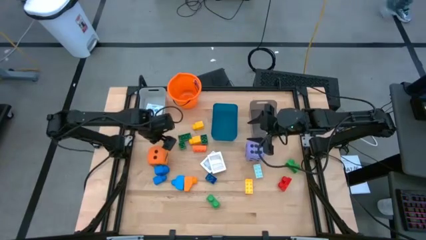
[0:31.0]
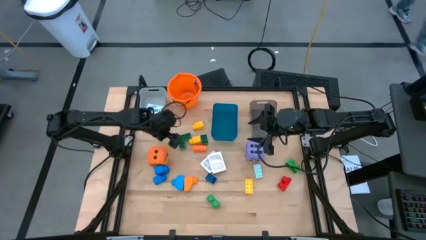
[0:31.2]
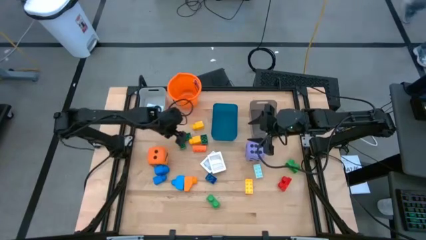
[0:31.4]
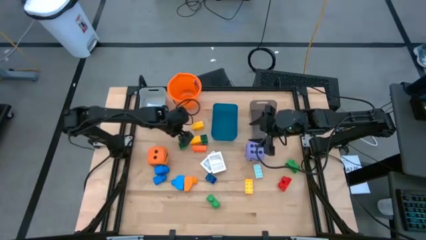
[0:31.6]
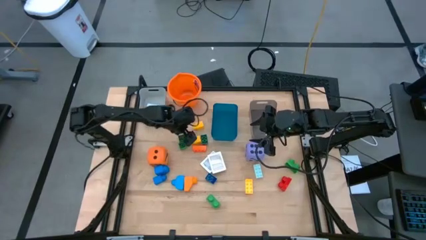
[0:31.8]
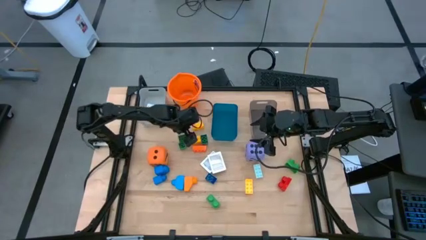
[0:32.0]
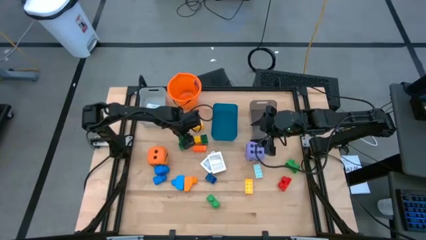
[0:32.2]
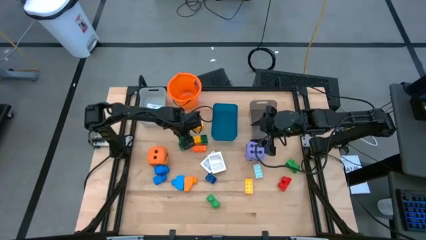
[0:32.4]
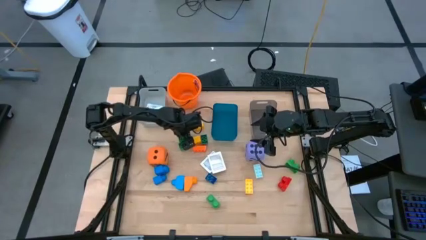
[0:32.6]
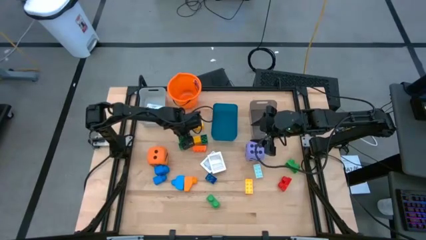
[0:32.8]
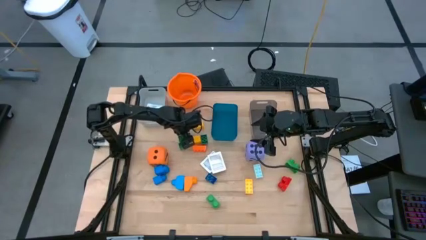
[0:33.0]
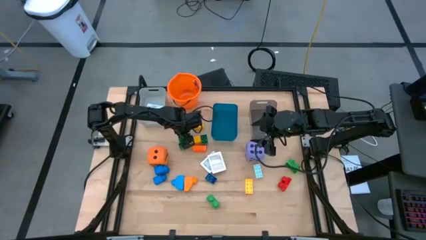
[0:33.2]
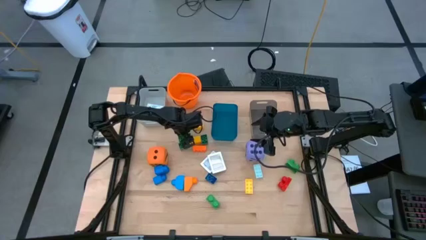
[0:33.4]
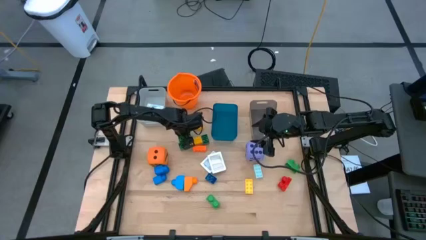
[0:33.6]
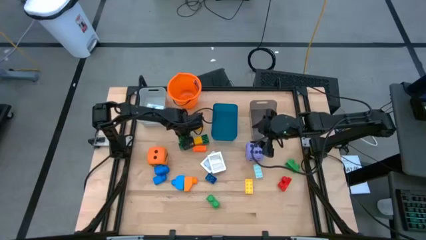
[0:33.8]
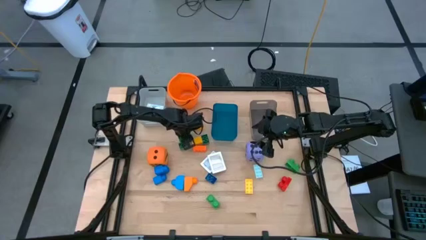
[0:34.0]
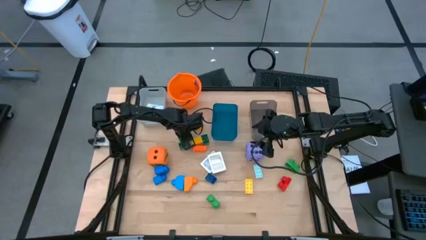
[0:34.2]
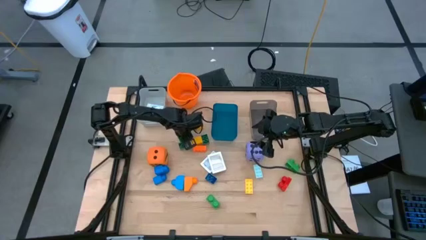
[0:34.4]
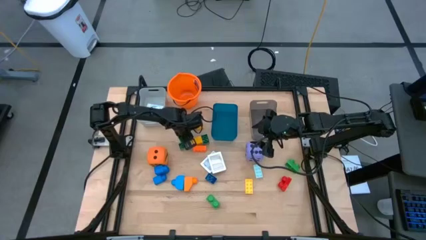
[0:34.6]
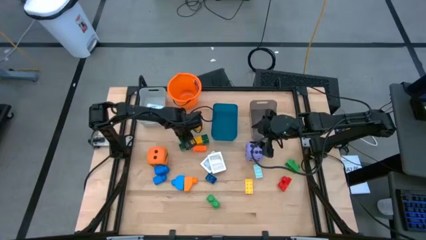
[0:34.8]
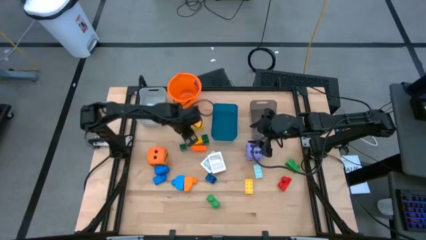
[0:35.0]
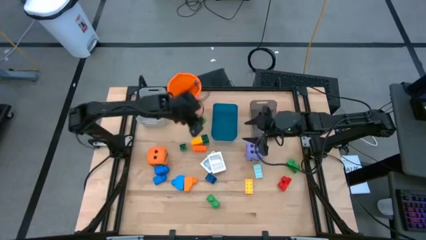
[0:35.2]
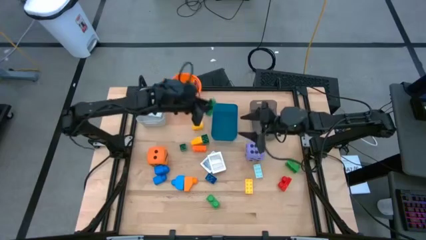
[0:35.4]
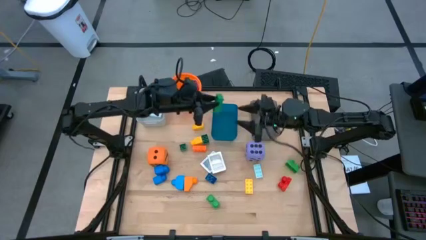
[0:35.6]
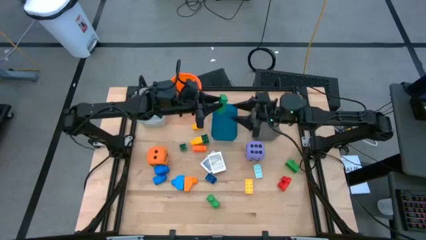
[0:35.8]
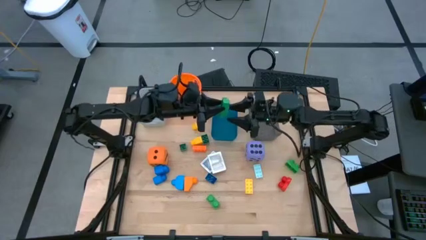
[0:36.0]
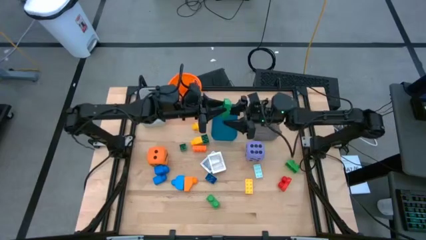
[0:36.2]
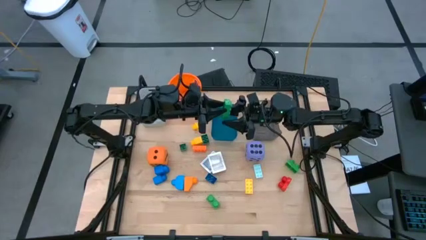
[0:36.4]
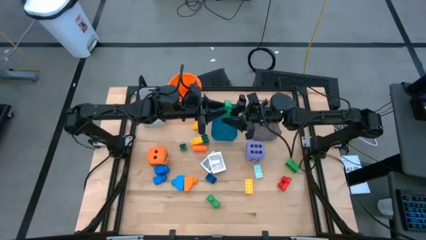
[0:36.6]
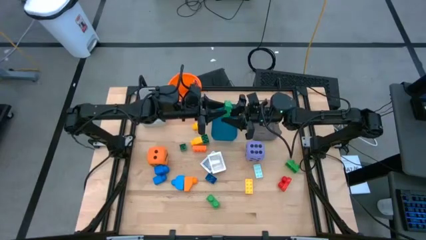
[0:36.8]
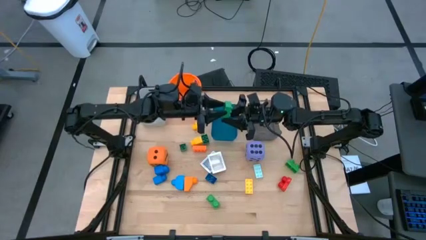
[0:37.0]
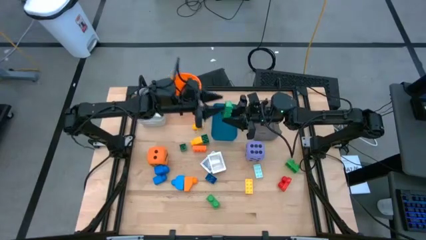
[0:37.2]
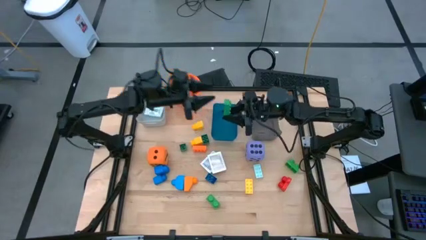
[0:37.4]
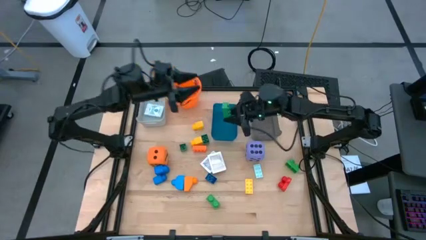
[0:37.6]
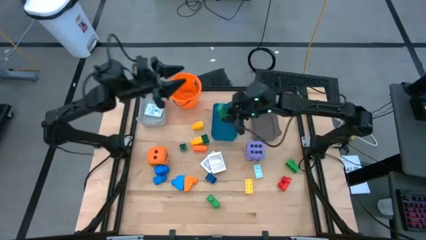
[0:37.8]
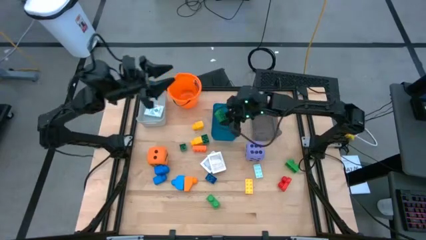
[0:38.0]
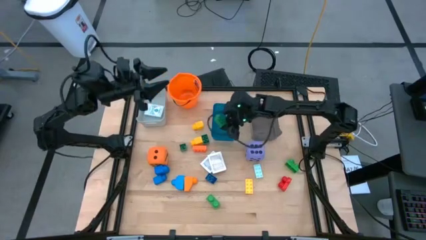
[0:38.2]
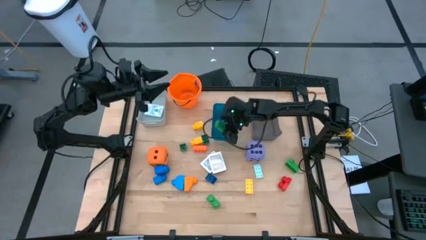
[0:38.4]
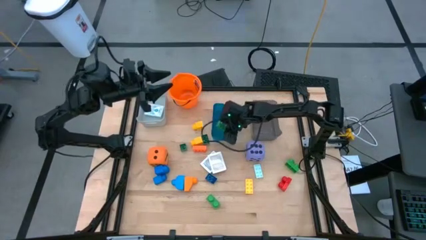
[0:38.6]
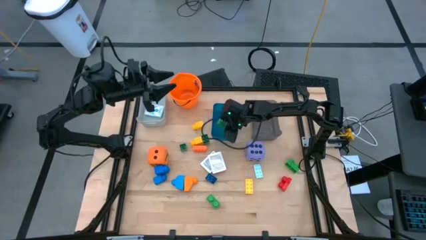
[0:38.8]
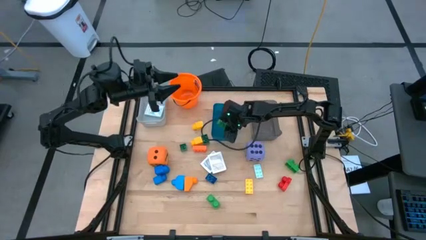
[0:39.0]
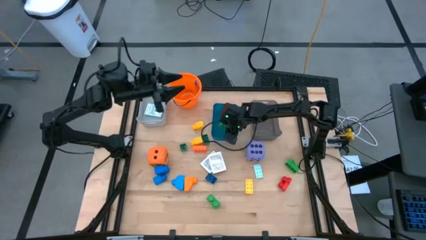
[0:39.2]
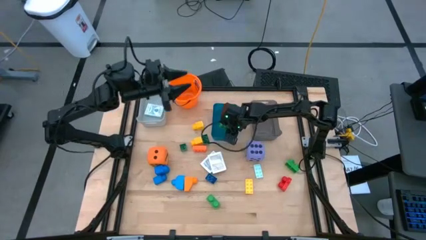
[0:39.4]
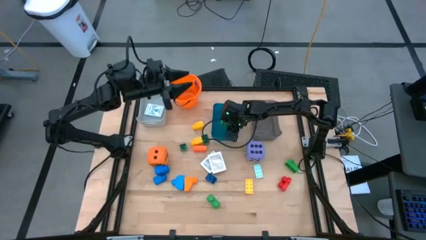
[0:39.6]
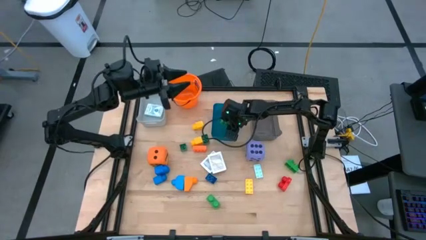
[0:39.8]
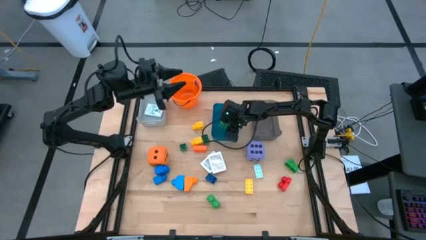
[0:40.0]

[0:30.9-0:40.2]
Task: Pick & Place Toys
Put the green game piece into the blue bin

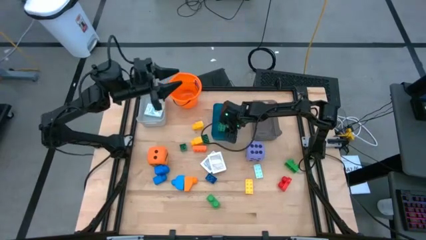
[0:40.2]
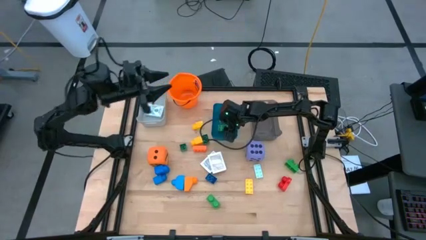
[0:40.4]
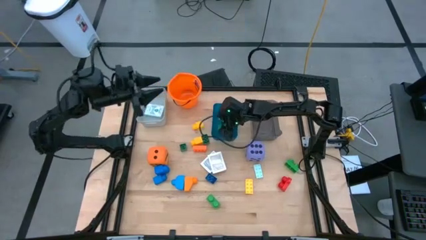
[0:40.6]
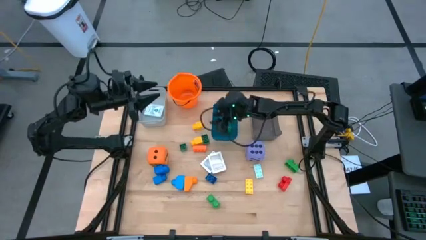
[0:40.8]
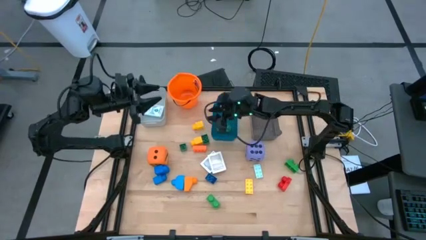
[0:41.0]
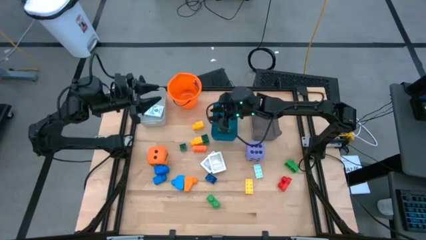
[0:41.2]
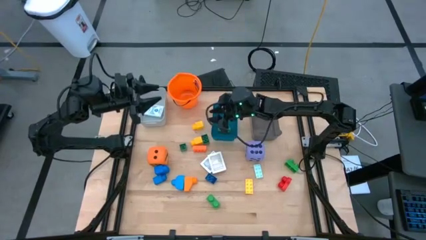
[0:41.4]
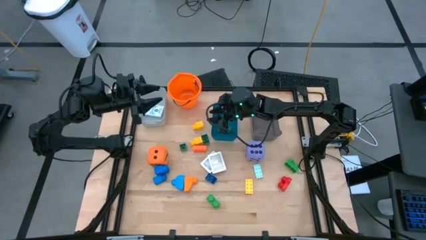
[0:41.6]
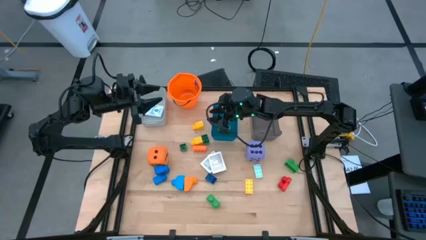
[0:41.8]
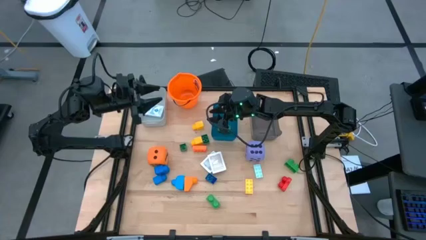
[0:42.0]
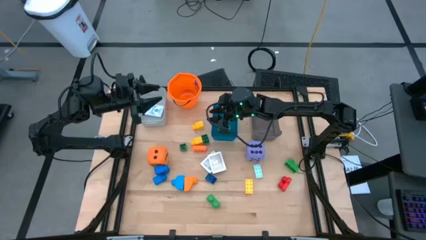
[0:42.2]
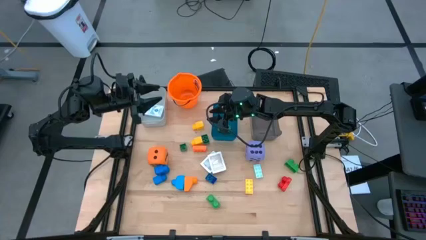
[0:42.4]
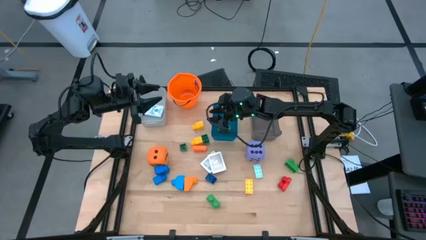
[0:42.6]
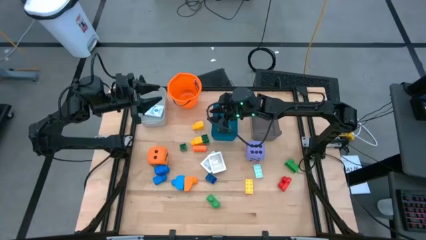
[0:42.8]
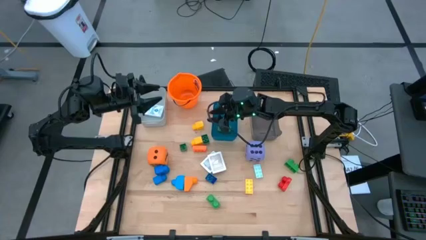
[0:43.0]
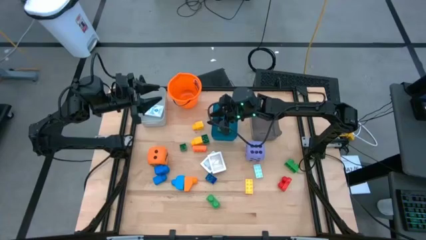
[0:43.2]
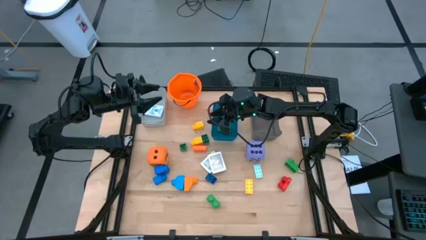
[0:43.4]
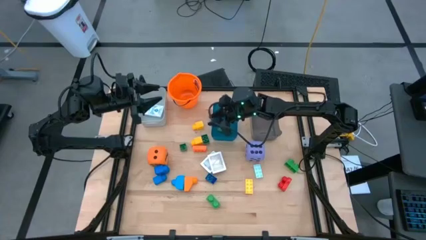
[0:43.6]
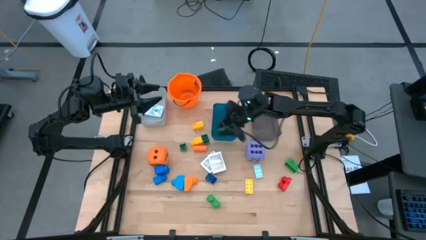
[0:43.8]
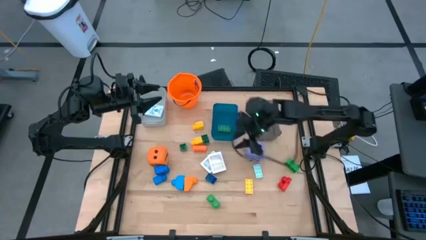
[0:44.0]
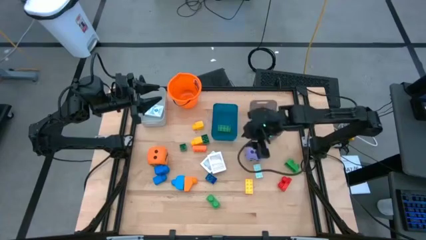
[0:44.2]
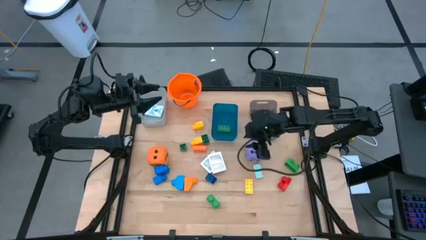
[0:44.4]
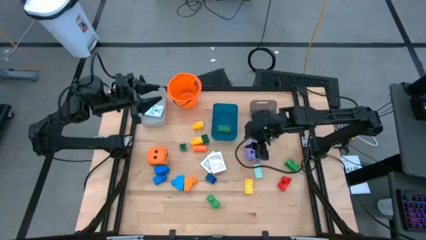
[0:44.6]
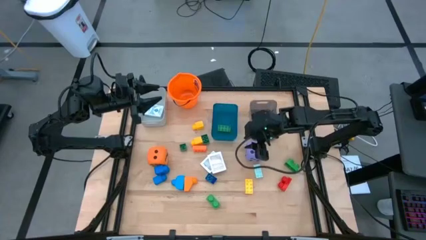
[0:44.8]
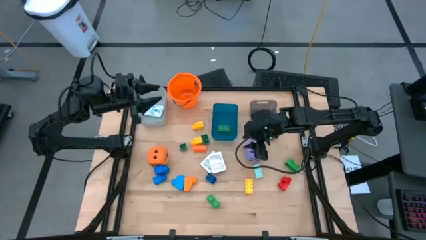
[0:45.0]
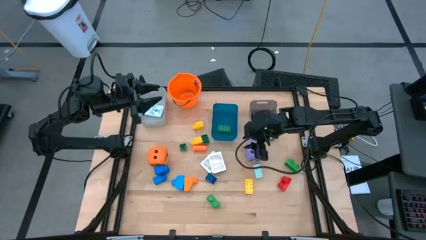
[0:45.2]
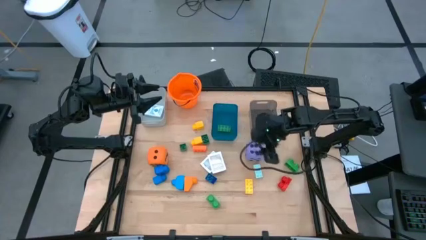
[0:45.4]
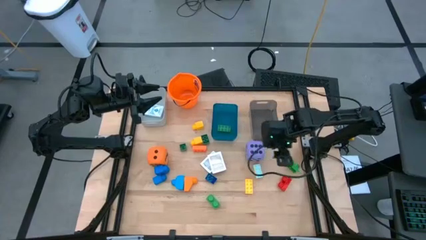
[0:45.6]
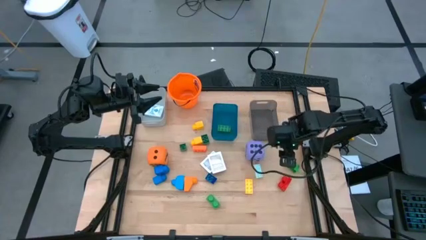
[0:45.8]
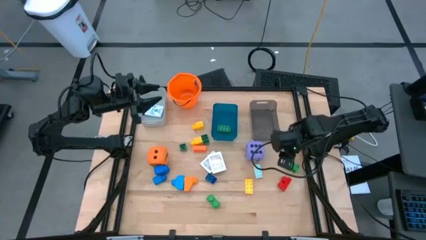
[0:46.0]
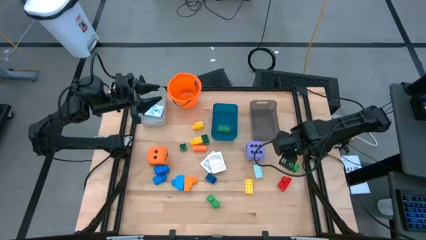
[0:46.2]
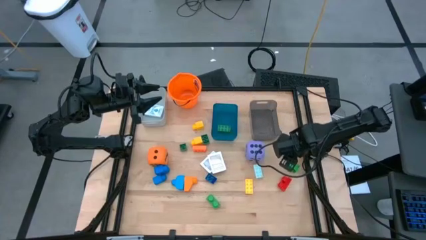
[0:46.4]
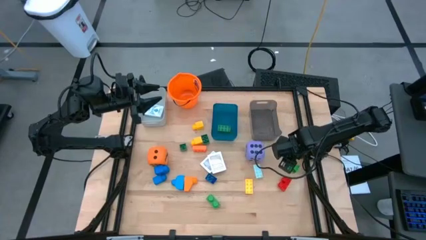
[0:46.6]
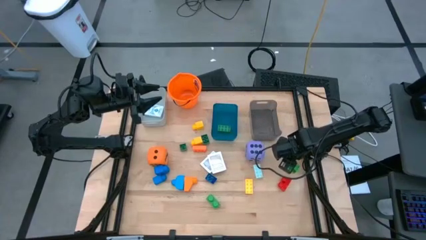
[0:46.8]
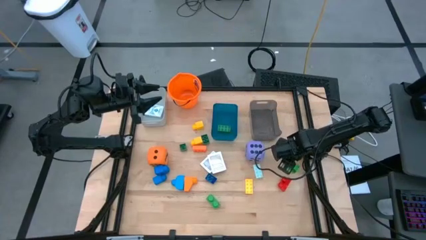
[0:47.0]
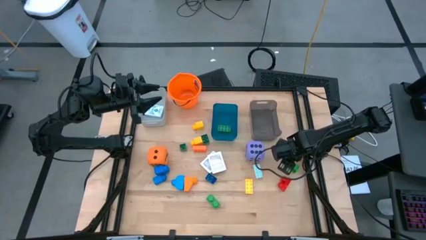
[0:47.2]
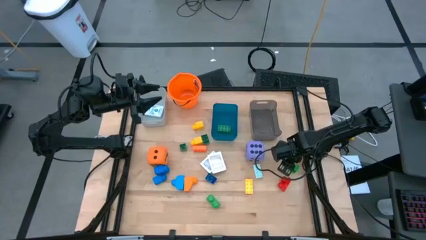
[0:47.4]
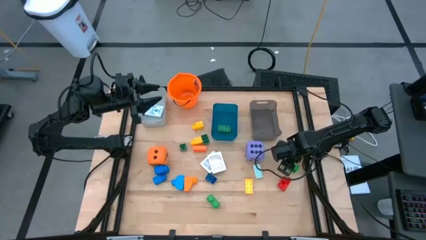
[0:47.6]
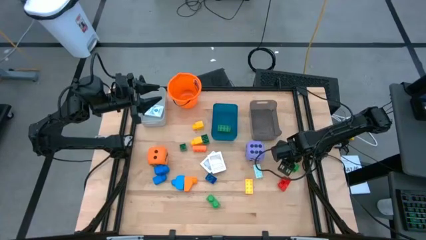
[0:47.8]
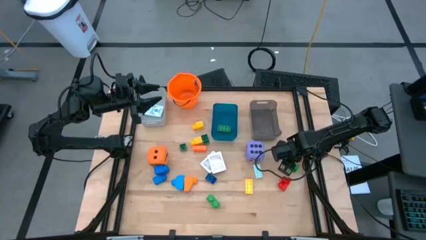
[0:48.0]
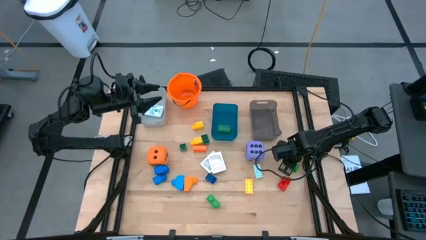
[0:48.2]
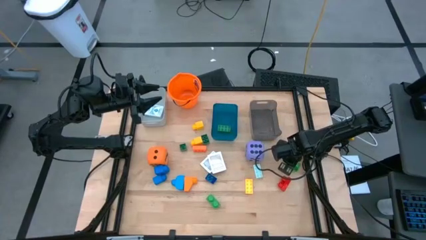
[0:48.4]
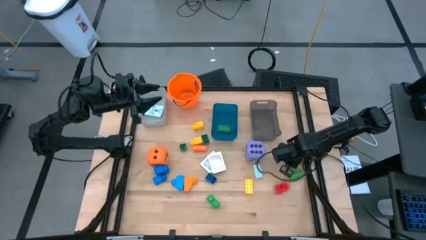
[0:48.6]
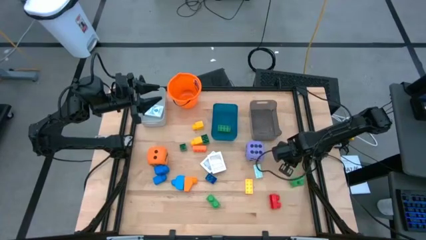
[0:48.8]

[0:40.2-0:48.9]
Put the green game piece into the blue bin
